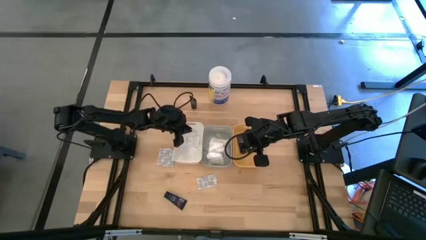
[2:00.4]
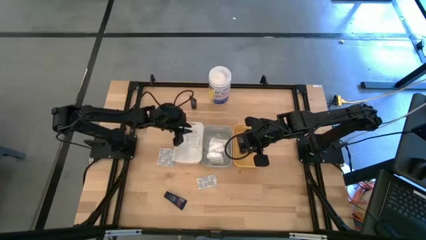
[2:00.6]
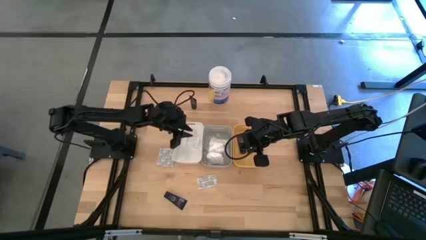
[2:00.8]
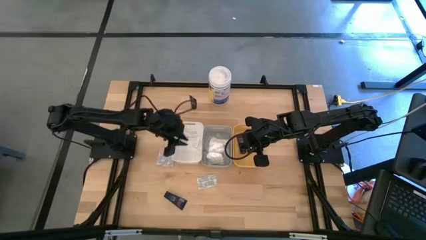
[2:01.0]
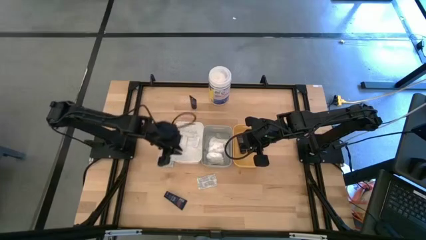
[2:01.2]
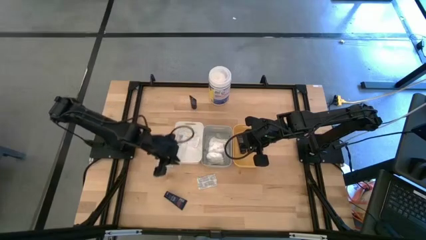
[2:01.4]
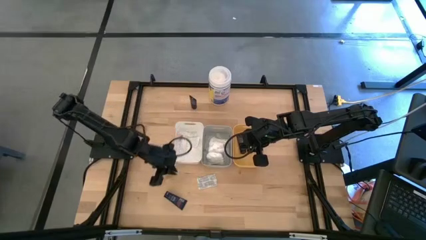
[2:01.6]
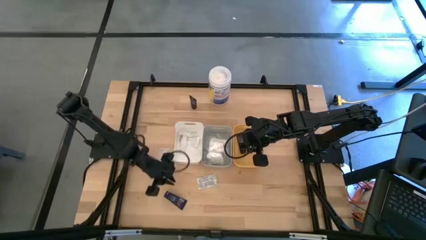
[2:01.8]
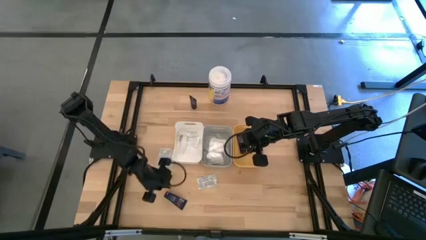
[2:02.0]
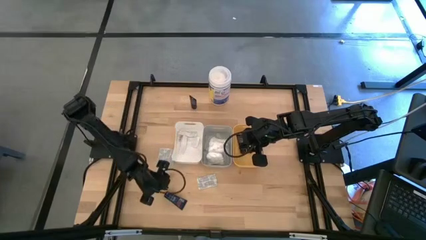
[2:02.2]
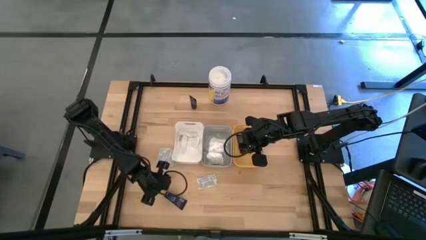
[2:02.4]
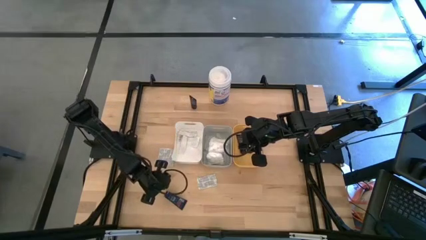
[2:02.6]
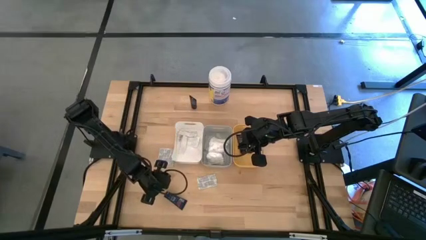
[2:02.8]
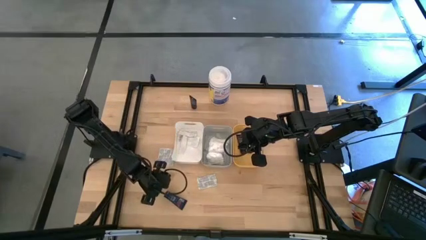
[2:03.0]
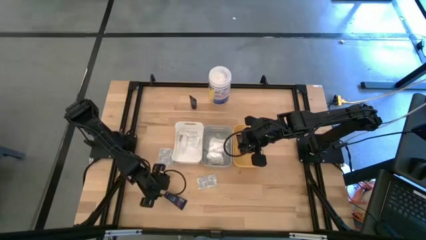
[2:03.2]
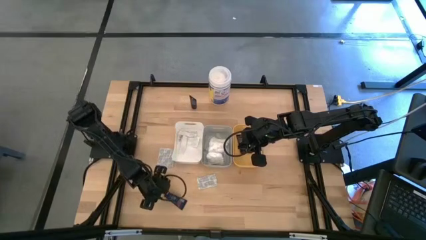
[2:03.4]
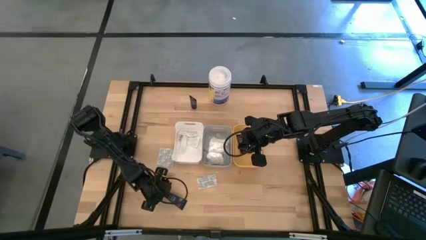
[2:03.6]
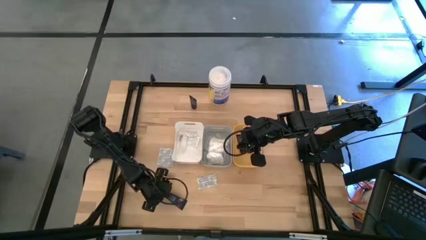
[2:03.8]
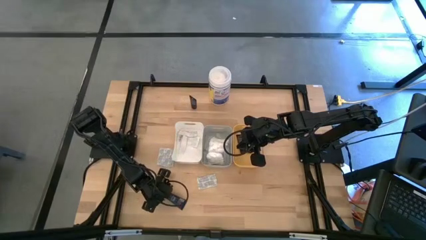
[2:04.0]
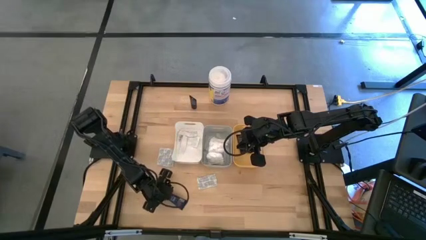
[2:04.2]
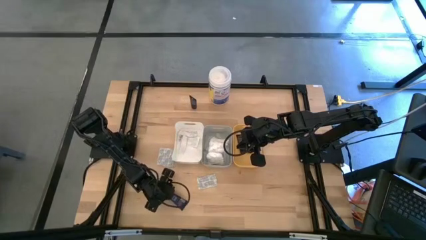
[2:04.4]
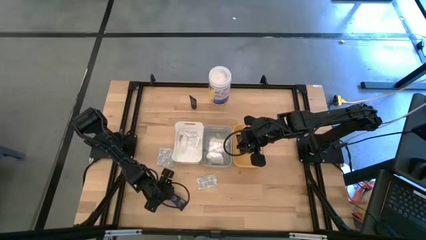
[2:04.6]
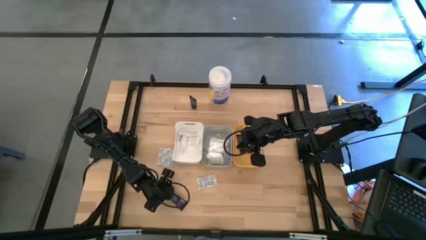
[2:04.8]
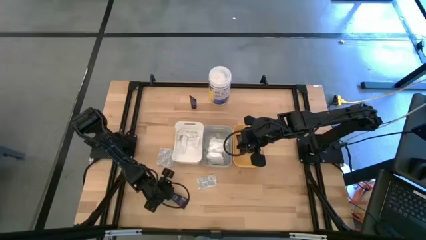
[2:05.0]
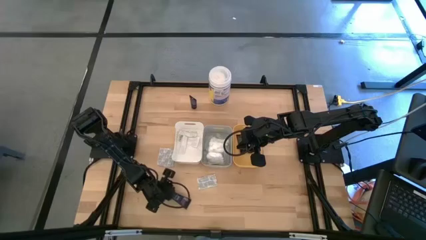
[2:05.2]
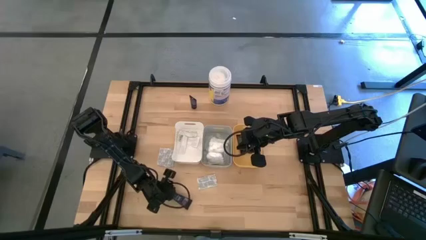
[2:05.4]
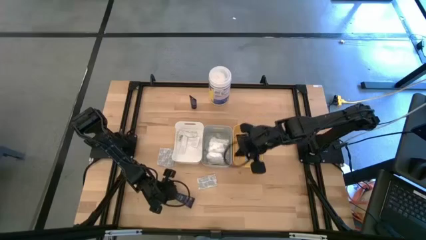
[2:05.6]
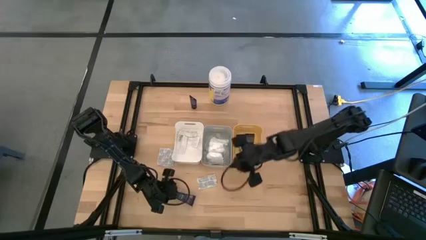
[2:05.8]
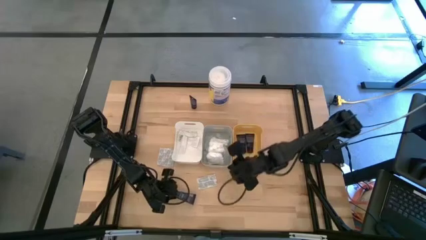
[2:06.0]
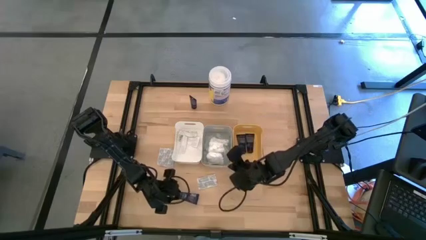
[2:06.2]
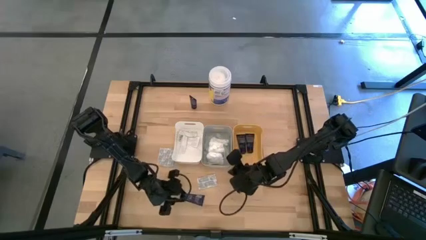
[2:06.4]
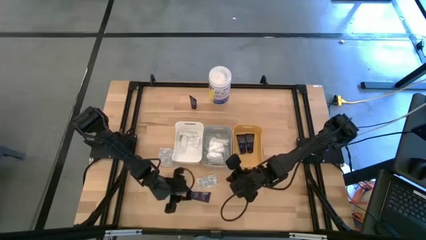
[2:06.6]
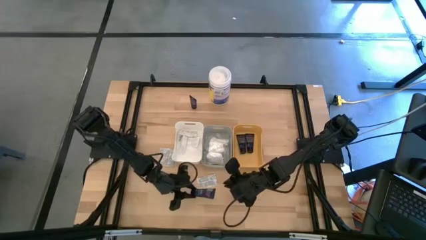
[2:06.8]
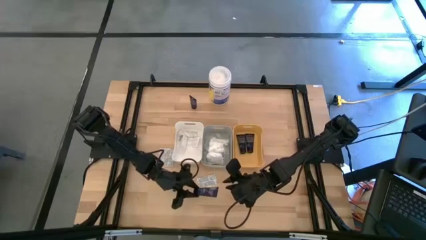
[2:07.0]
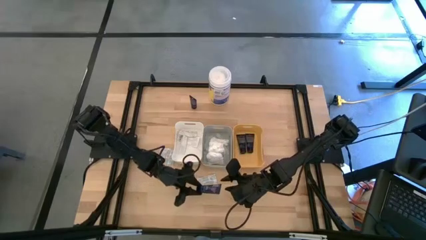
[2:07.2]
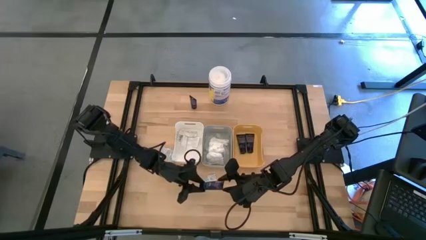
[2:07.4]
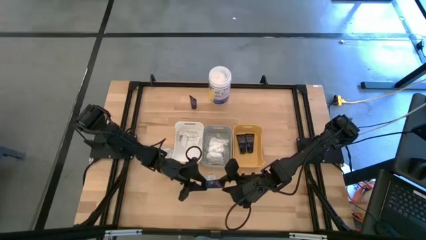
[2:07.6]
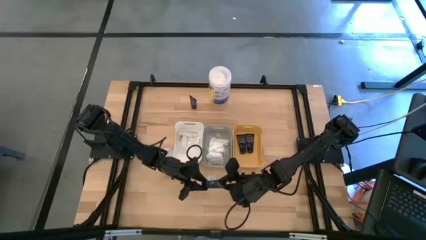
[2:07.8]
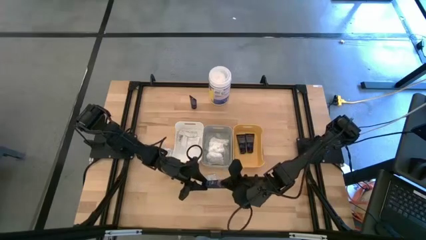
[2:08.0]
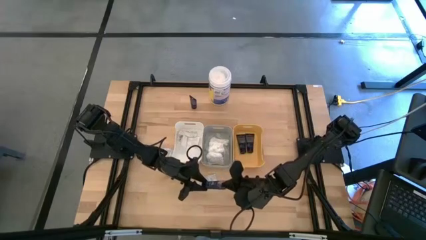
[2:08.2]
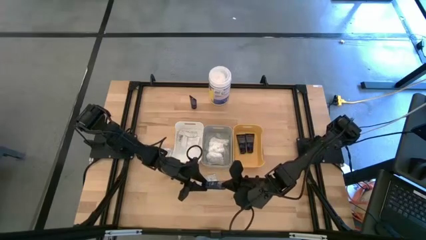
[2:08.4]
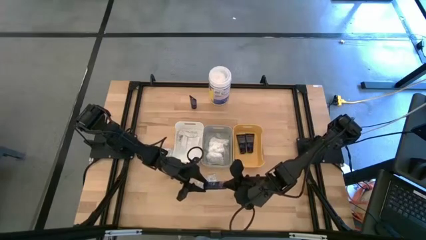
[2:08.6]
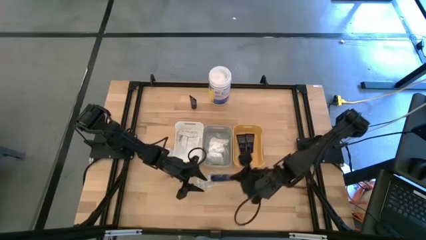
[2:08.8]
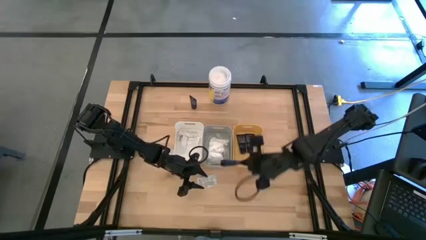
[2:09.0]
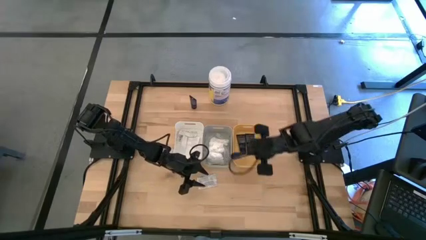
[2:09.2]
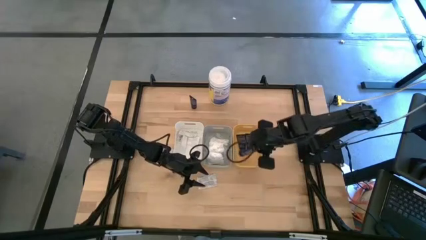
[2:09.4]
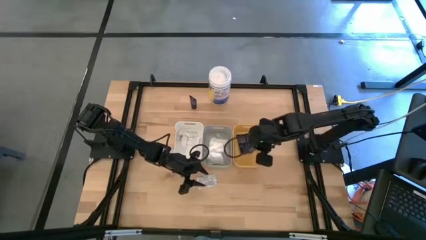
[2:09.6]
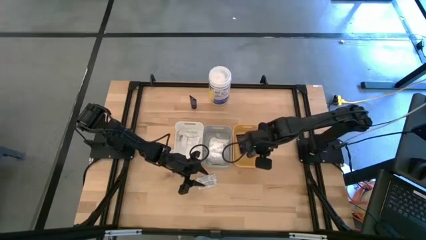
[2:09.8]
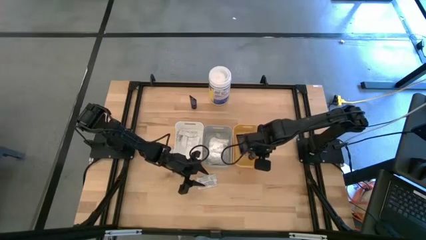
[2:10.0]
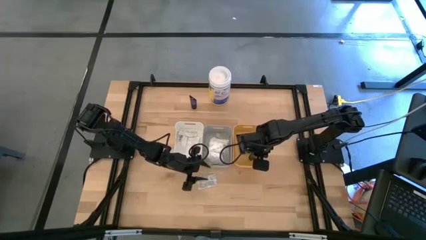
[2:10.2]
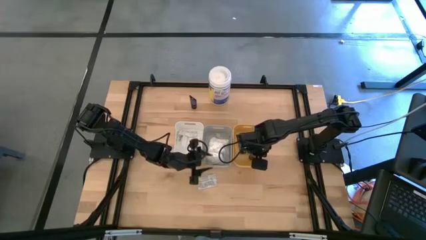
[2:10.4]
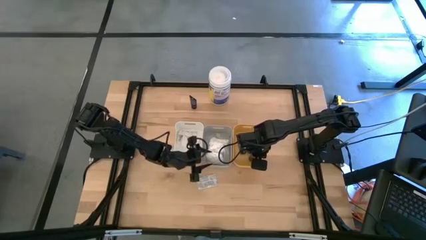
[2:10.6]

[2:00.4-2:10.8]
Task: Pick & Place Travel size toiletries
Put the blue shave cream into the yellow bin

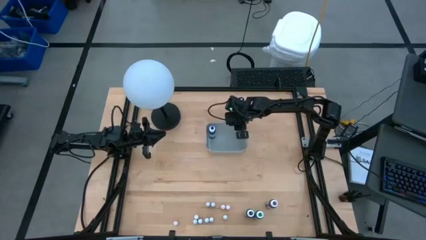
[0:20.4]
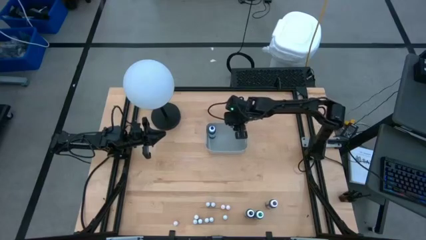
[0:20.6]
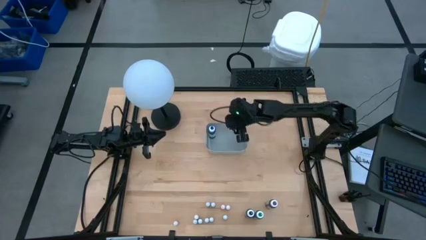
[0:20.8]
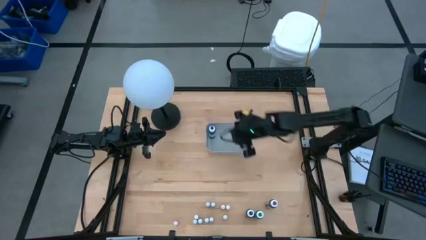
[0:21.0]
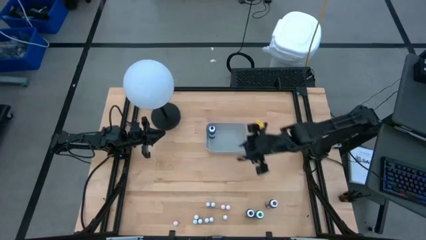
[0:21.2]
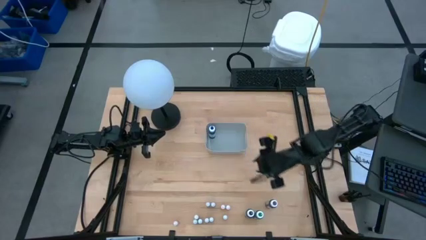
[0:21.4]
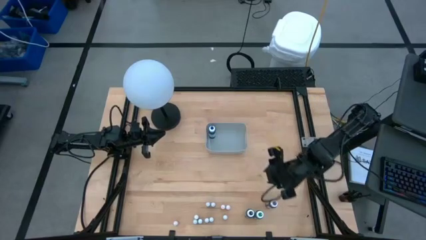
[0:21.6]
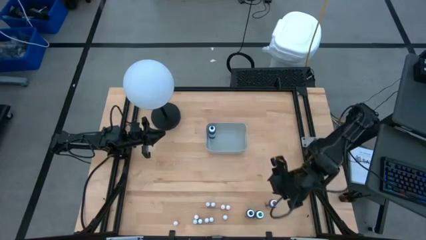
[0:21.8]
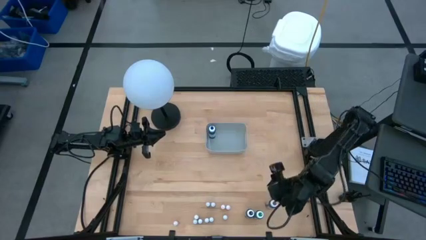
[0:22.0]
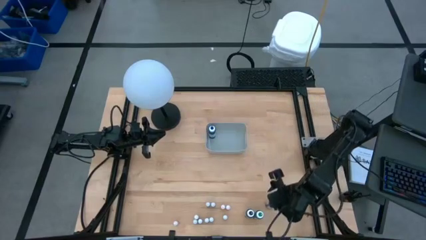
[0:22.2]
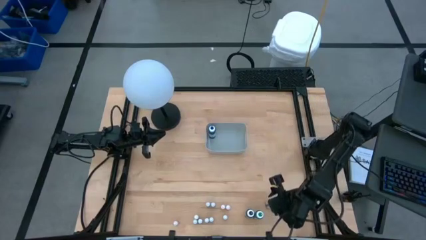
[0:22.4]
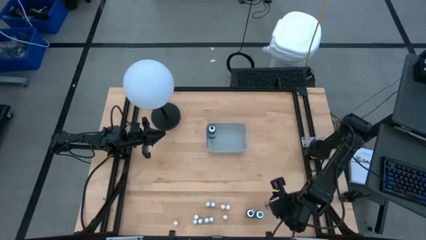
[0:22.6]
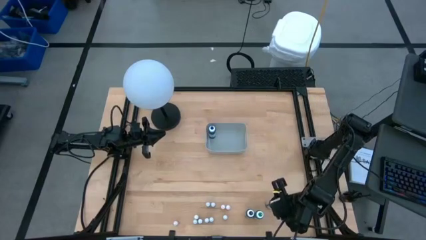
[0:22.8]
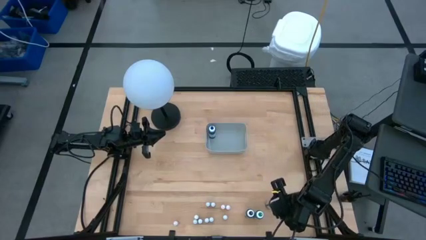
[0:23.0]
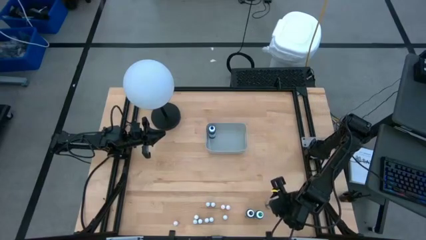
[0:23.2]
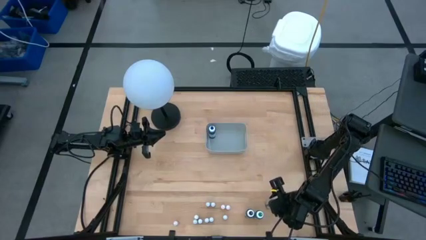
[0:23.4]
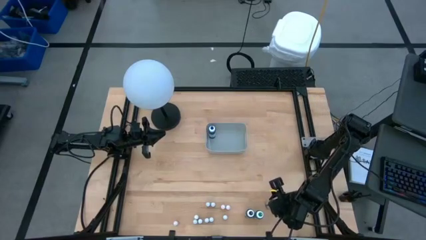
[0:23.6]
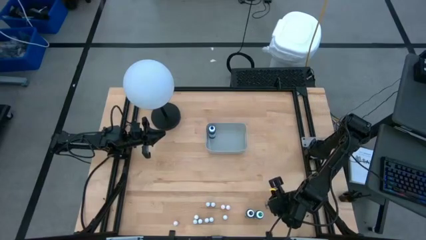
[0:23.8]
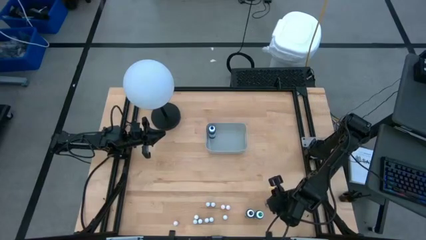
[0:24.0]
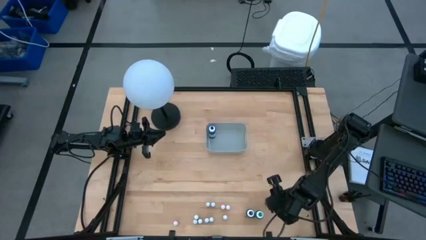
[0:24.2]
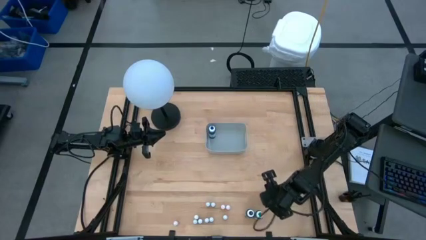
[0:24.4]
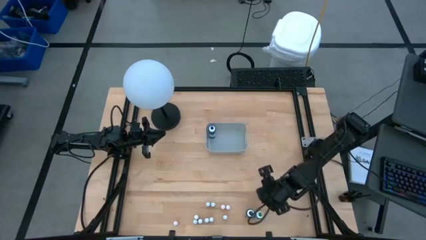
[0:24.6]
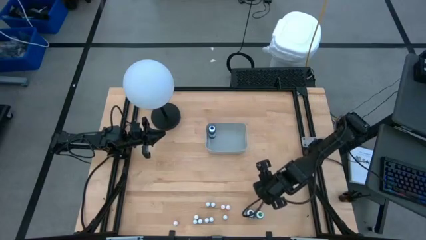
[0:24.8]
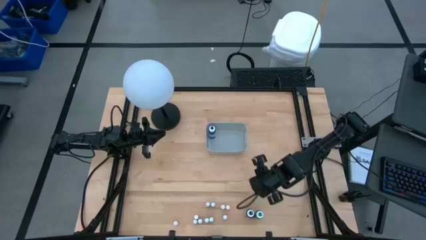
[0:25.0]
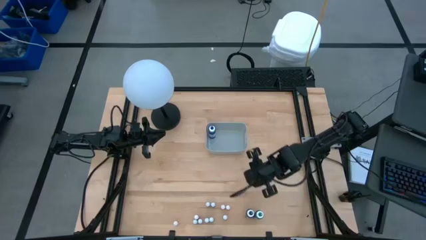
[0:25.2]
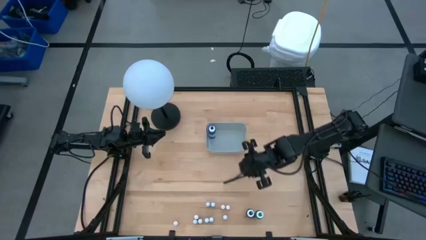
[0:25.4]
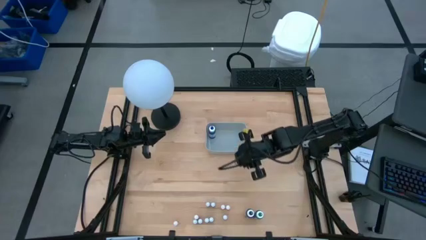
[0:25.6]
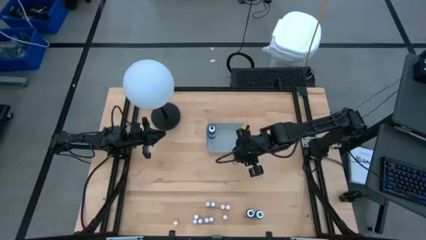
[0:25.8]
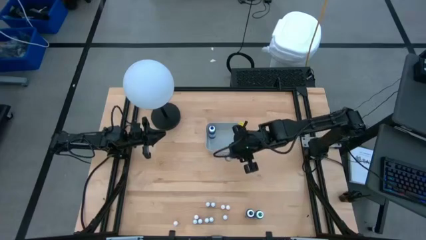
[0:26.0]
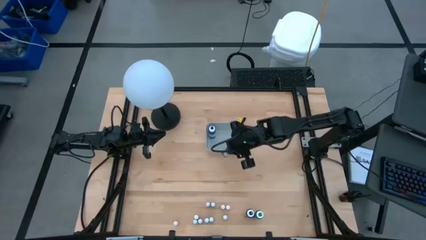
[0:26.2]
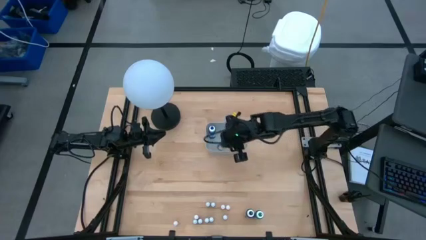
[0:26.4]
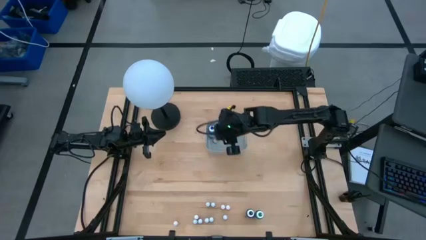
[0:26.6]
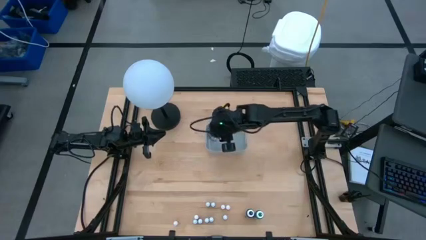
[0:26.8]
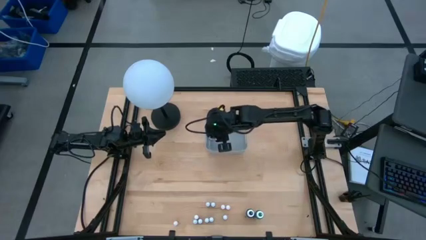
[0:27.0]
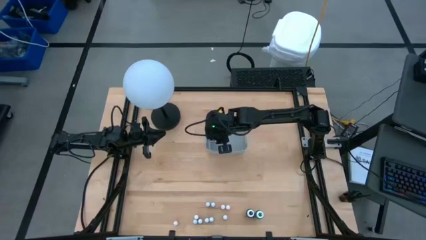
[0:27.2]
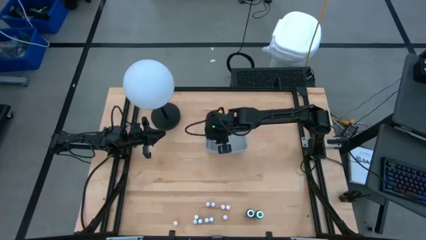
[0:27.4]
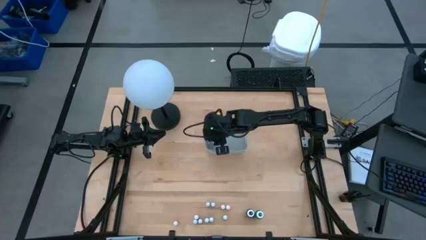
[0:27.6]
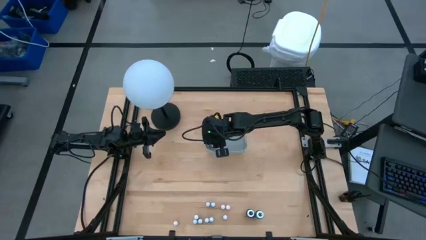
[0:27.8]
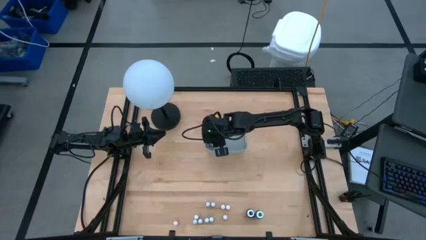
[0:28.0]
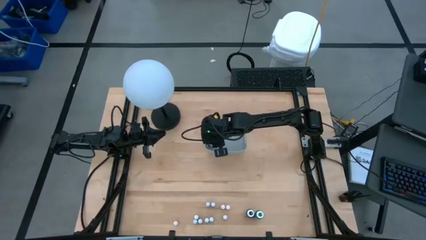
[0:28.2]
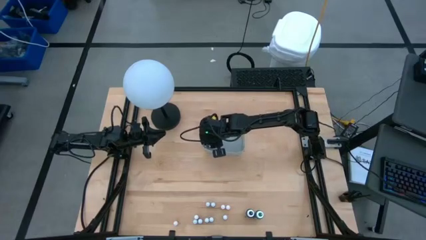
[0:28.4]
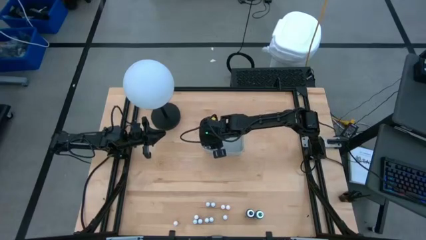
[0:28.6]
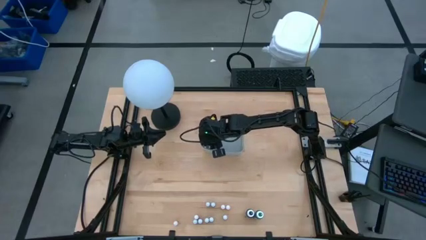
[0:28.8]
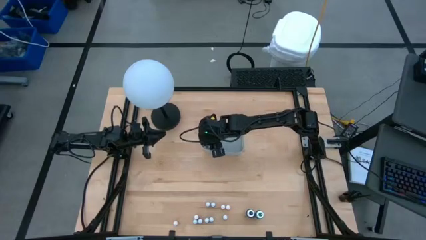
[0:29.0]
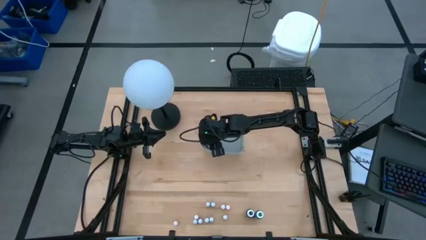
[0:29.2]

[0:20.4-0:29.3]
Task: Pick & Place food coloring
Put the large purple food coloring bottle into the gray bin
